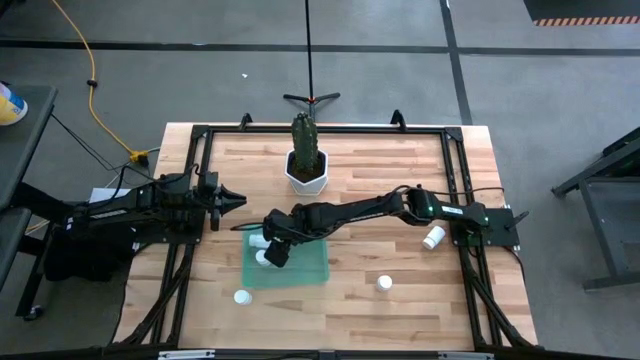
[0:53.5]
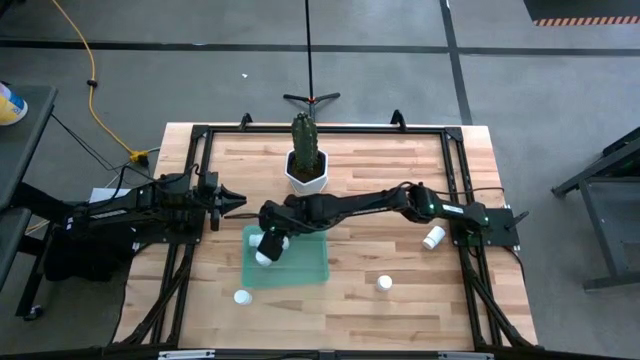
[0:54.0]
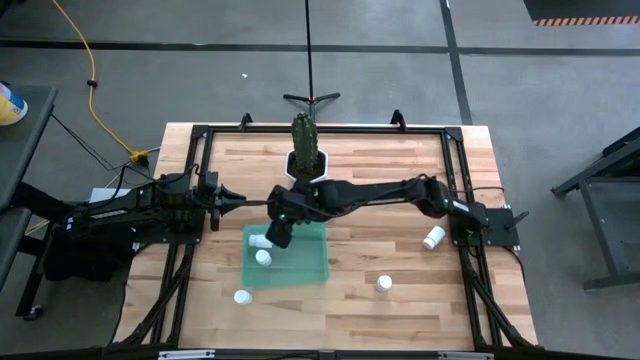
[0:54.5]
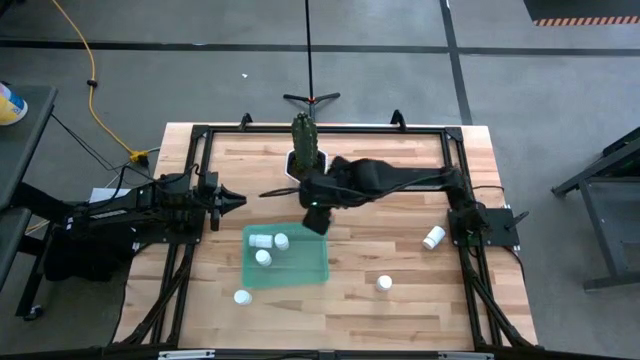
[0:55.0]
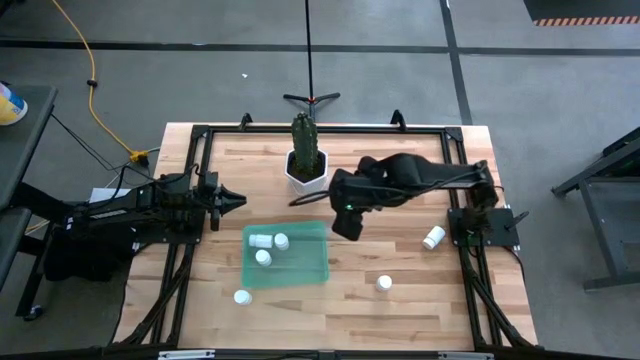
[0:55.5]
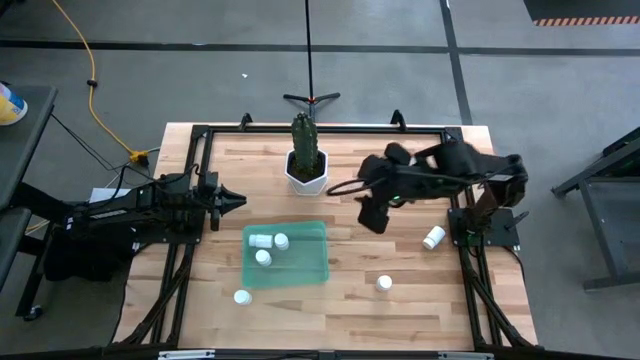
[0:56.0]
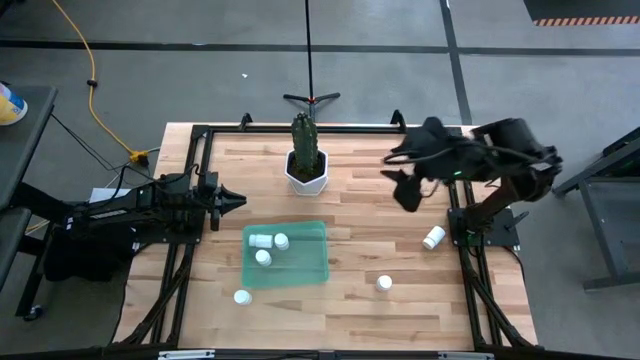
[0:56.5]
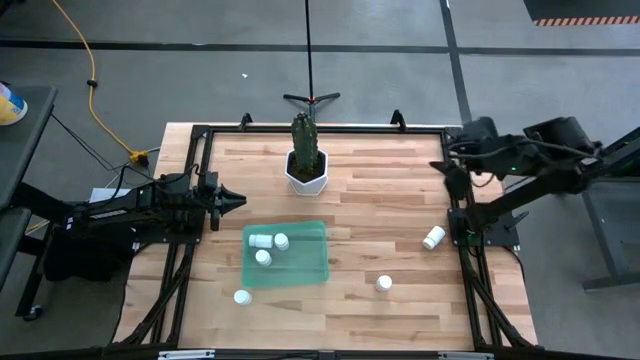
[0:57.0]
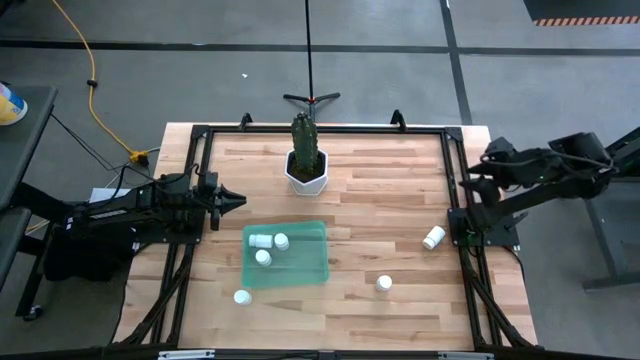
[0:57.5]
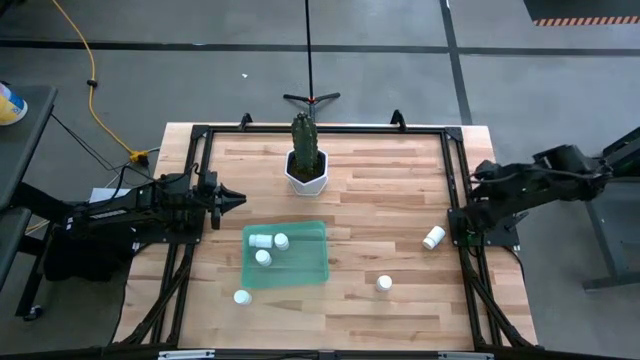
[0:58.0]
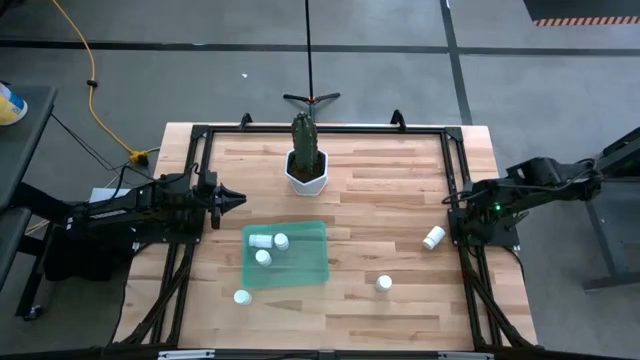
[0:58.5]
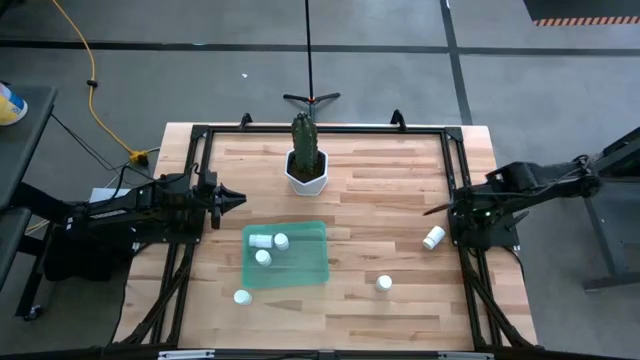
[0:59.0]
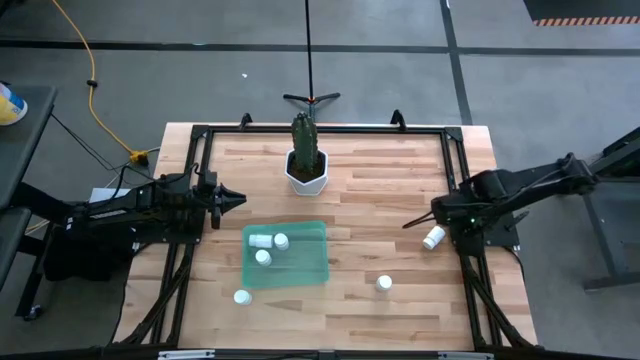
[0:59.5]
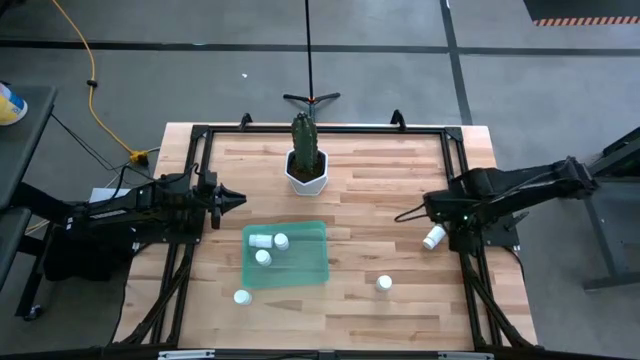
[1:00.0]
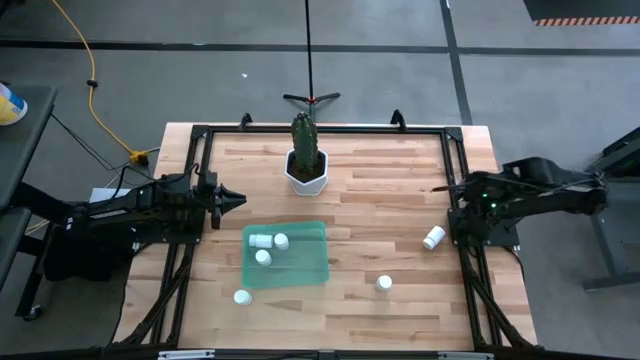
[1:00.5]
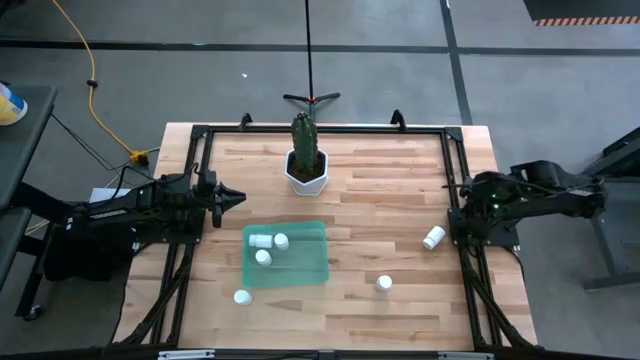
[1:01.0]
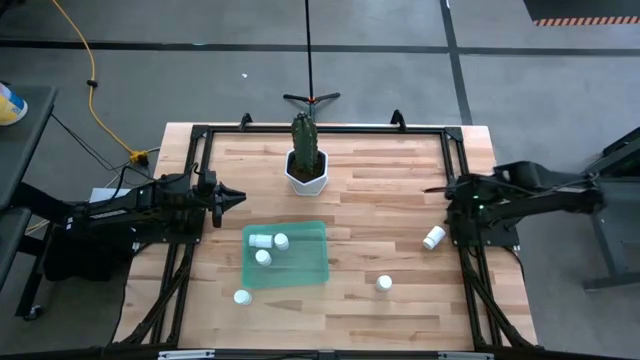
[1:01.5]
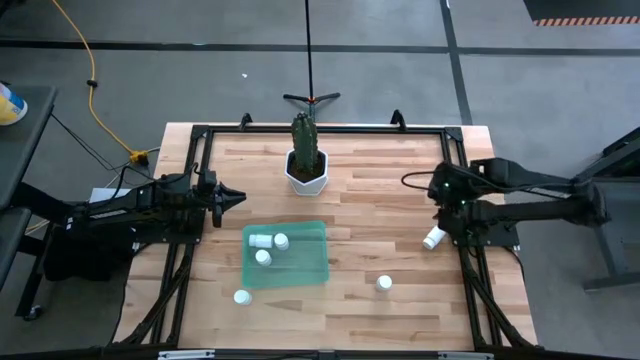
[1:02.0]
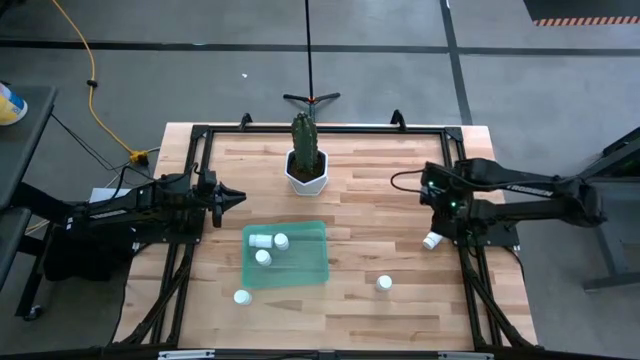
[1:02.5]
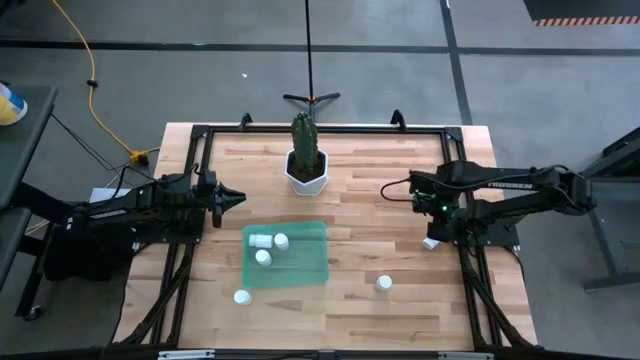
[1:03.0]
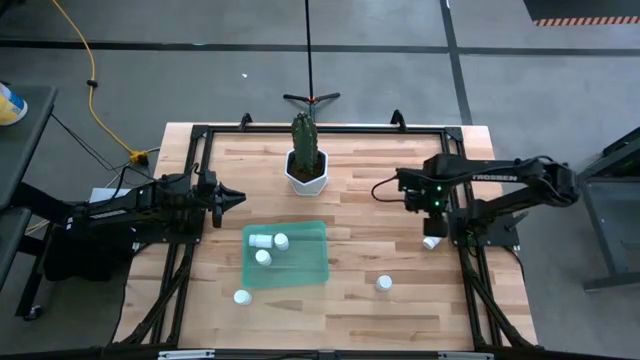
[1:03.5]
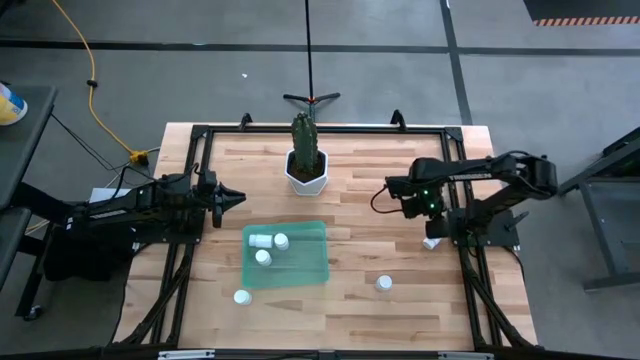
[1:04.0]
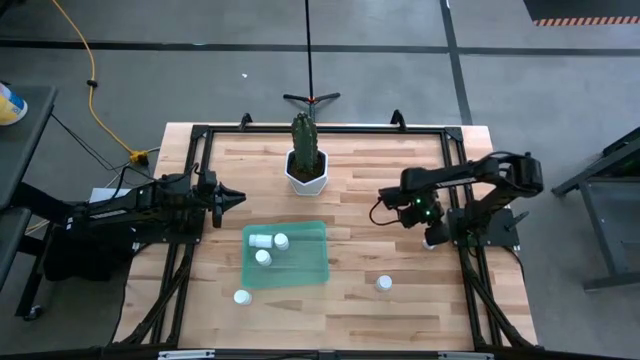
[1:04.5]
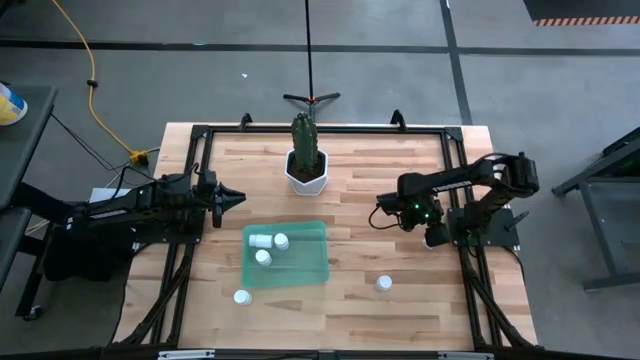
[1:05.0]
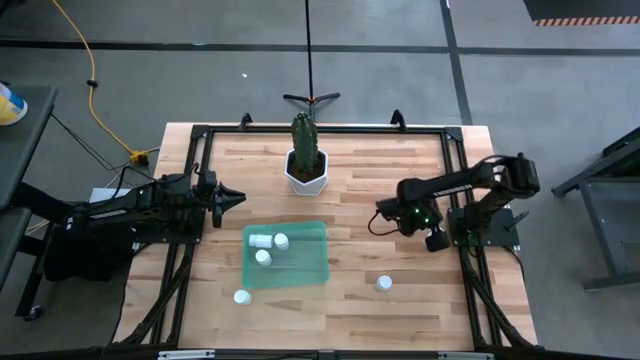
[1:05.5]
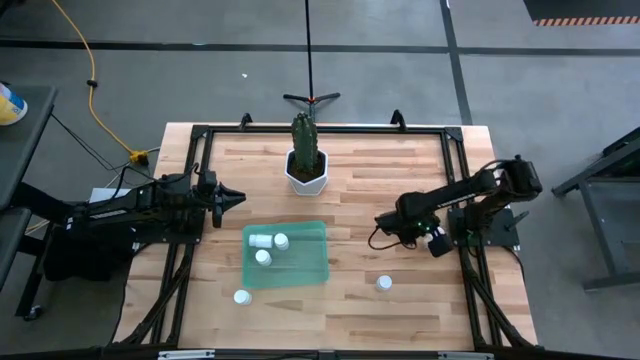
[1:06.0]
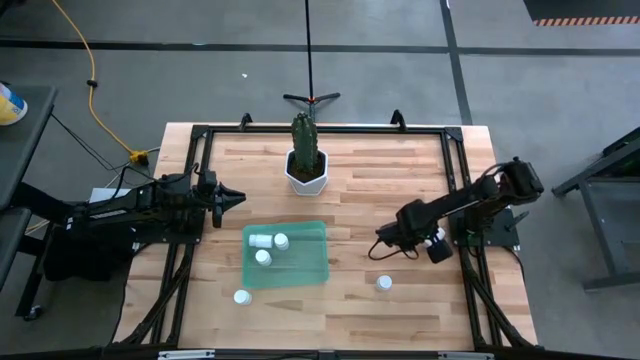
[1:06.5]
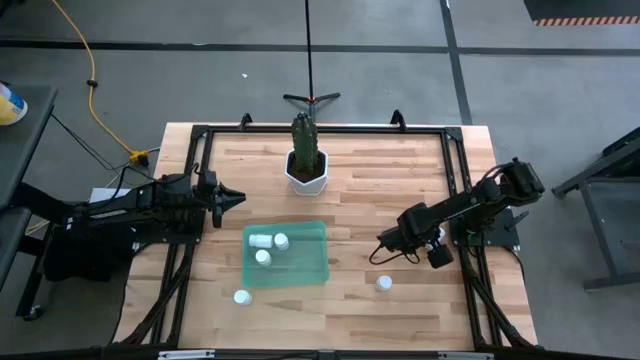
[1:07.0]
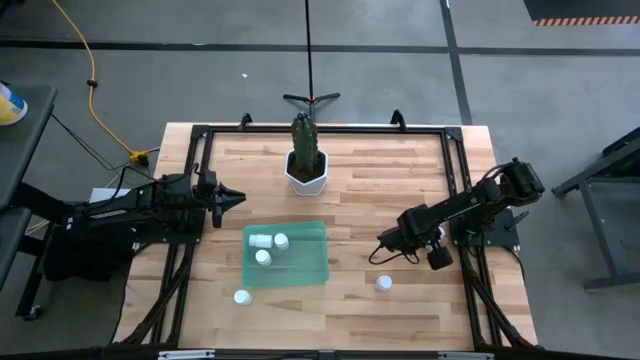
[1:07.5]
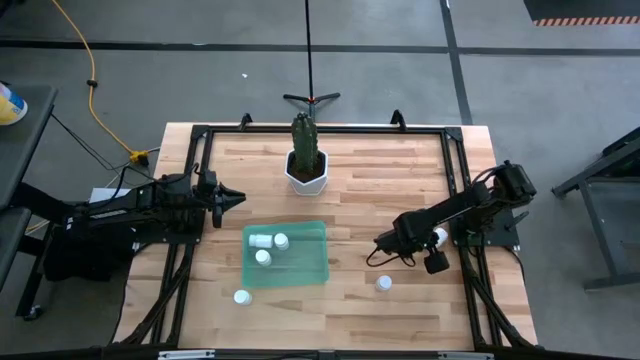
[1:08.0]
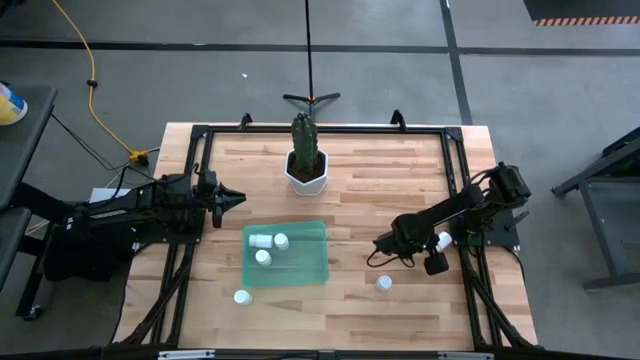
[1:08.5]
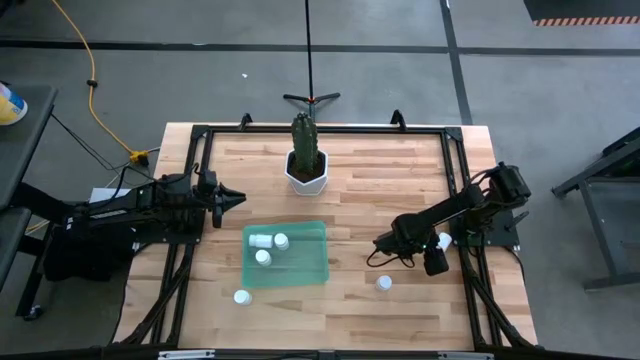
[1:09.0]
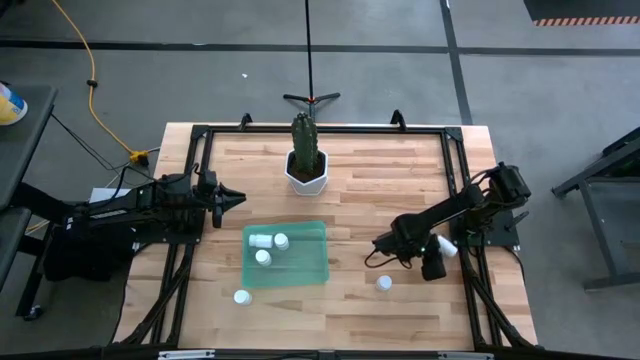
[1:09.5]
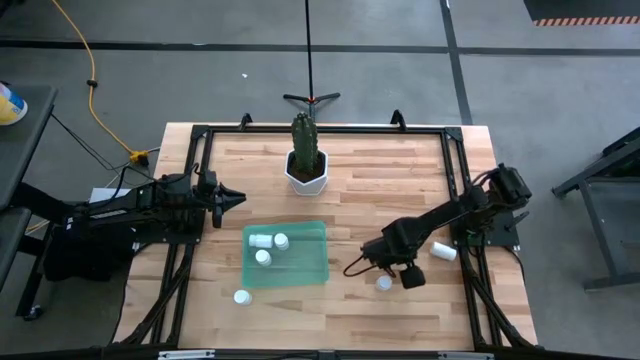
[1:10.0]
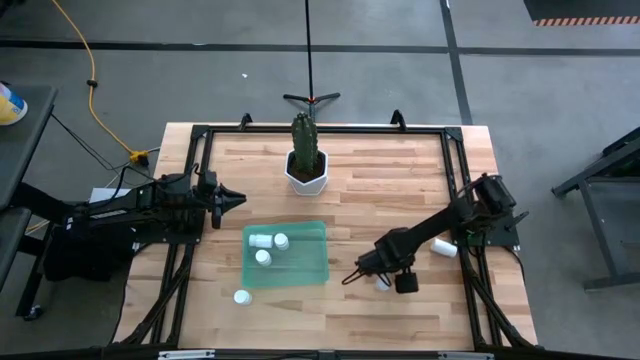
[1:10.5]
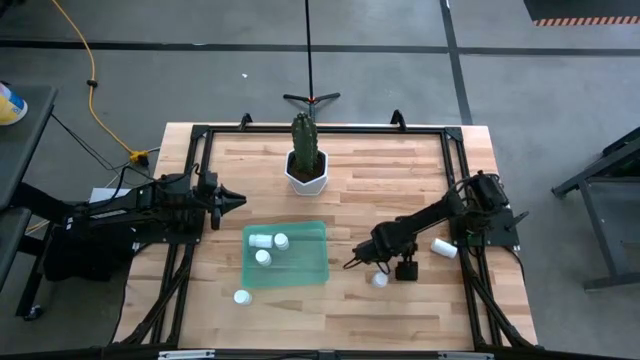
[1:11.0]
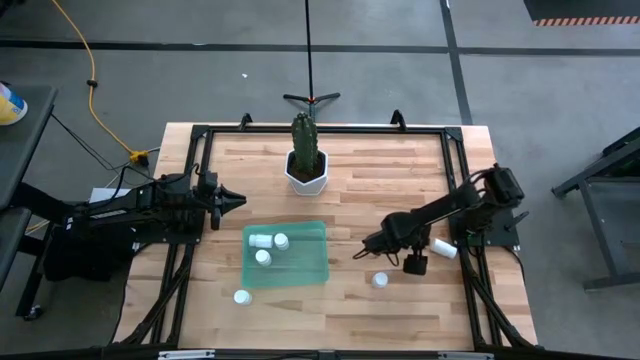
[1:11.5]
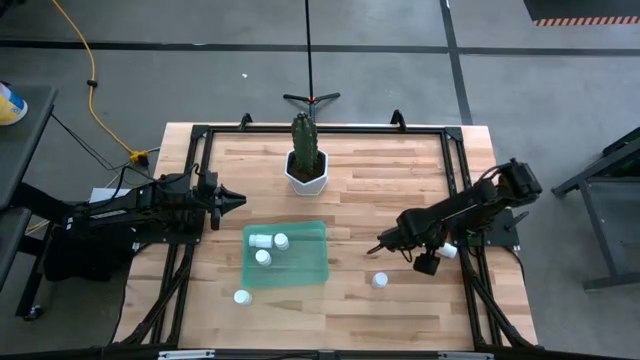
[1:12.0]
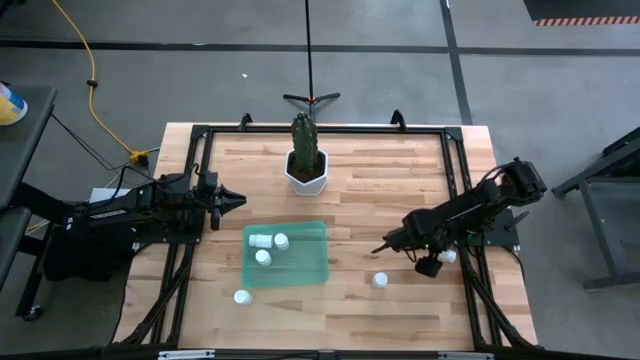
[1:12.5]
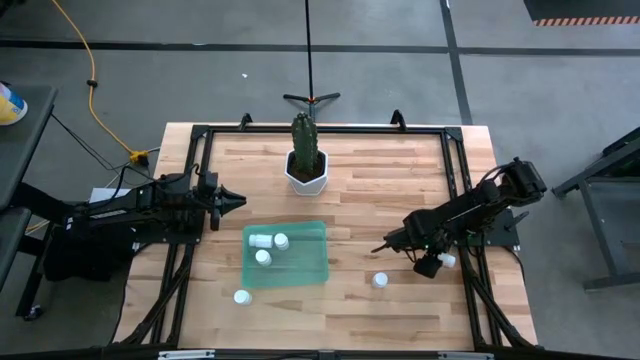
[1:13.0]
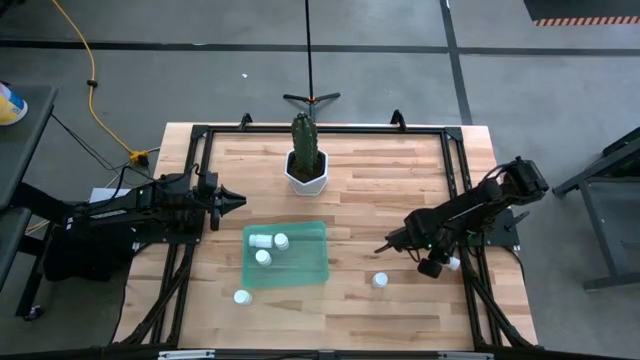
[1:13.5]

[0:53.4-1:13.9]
Task: Pick and place pill bottles into a basket
Put the white pill bottle into the green bin

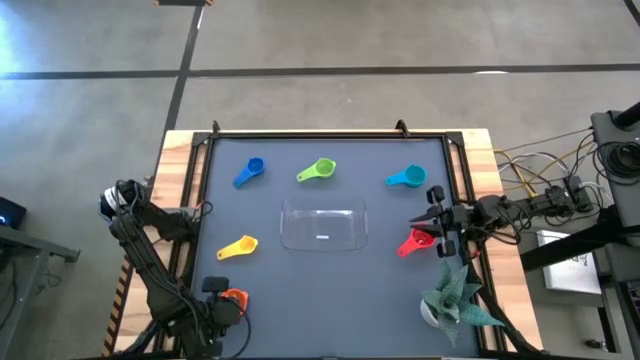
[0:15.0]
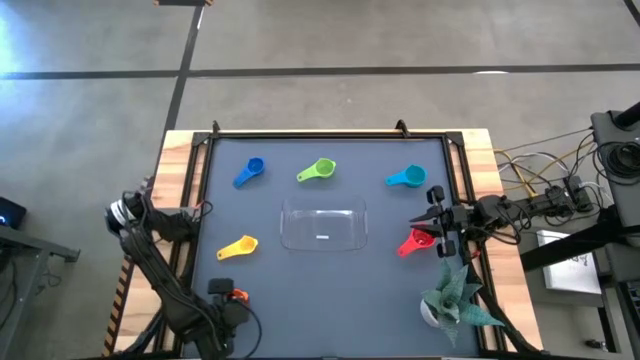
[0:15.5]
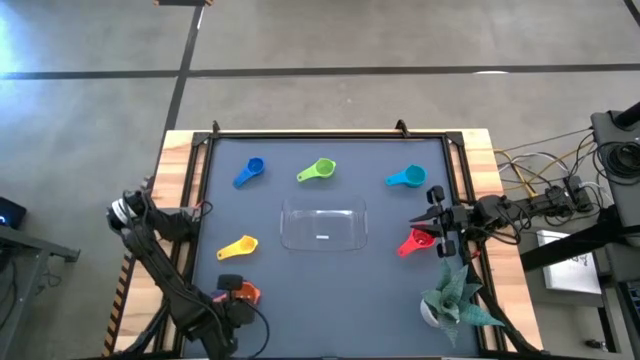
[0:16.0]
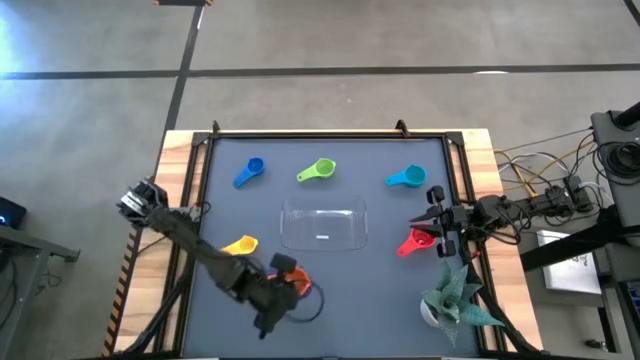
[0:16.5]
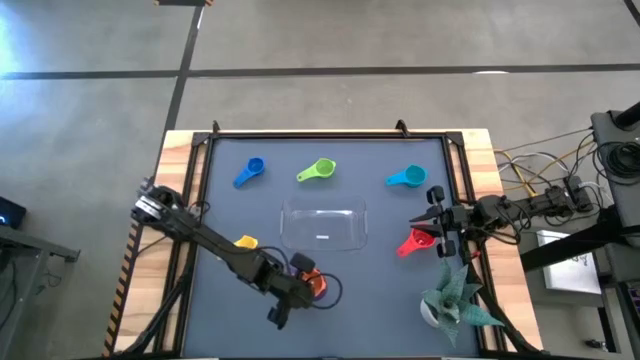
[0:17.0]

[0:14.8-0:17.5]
Task: Nest measuring cups in basket
Move the stacked measuring cups to the bottom center of the table
